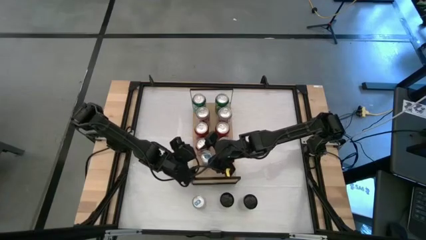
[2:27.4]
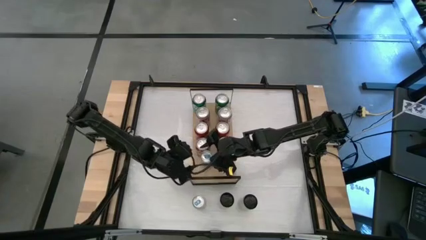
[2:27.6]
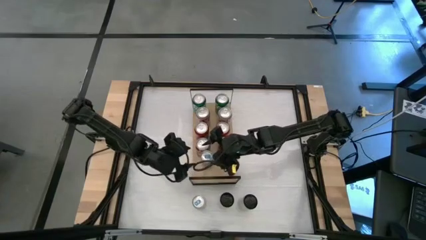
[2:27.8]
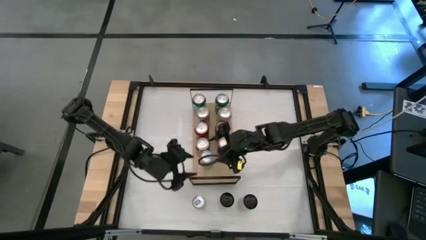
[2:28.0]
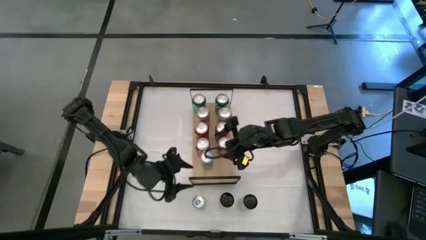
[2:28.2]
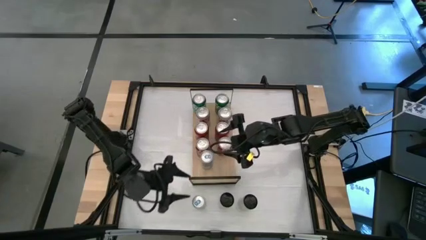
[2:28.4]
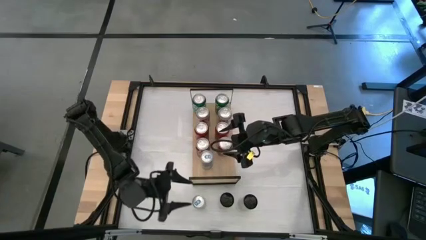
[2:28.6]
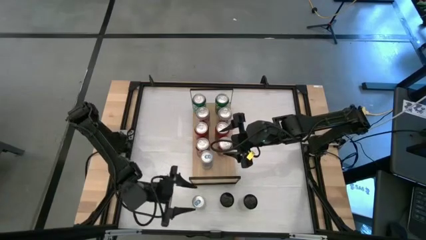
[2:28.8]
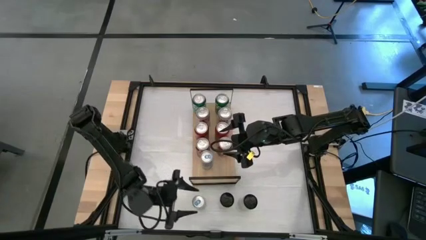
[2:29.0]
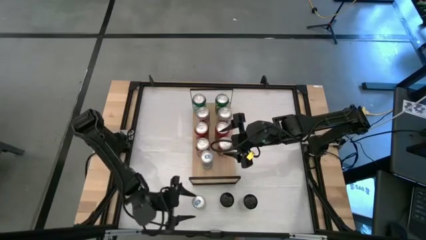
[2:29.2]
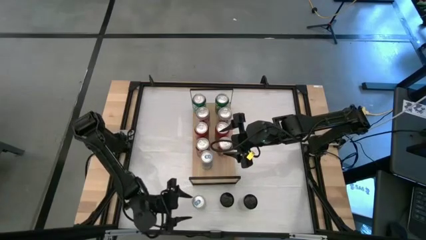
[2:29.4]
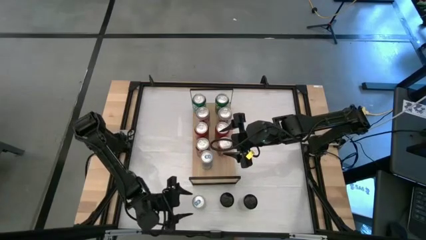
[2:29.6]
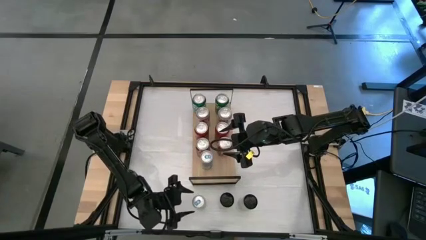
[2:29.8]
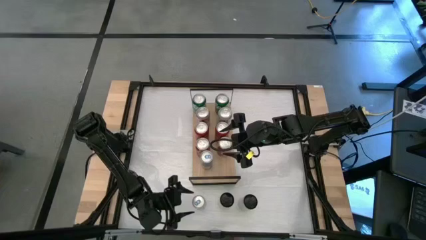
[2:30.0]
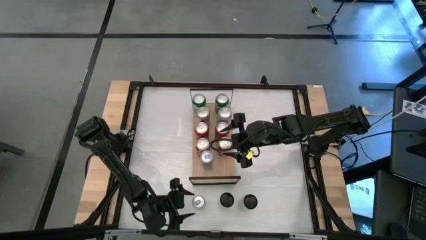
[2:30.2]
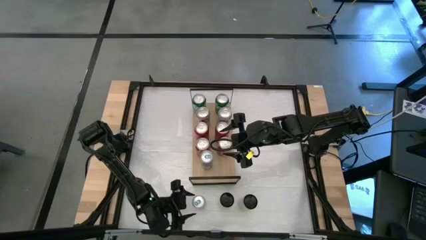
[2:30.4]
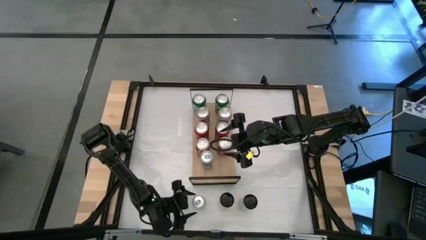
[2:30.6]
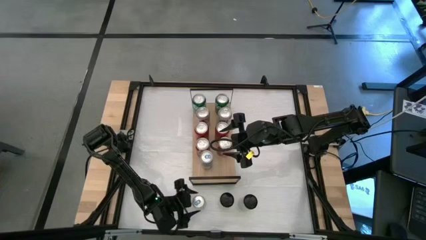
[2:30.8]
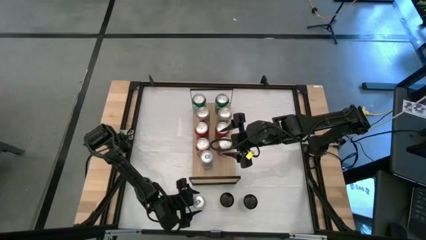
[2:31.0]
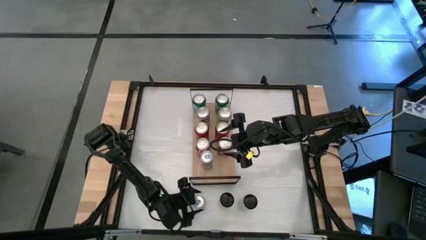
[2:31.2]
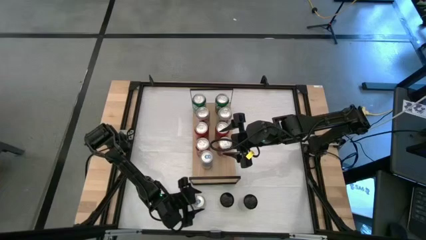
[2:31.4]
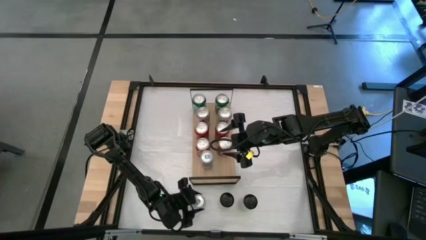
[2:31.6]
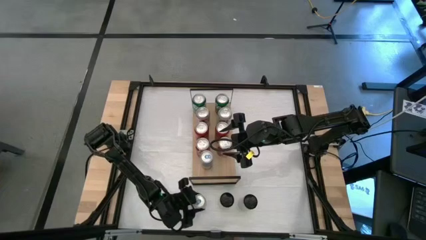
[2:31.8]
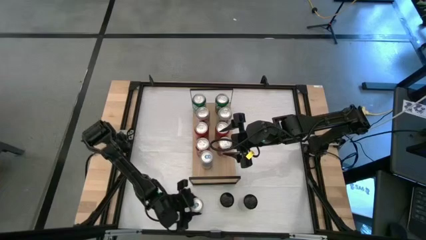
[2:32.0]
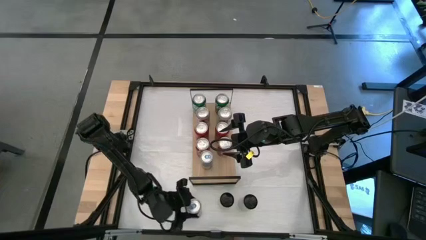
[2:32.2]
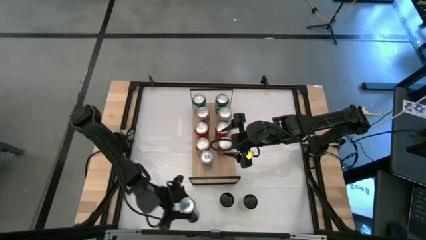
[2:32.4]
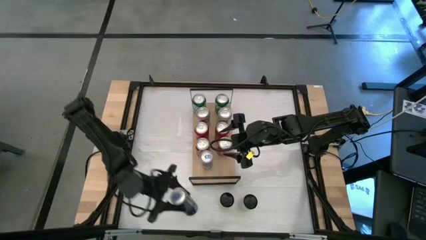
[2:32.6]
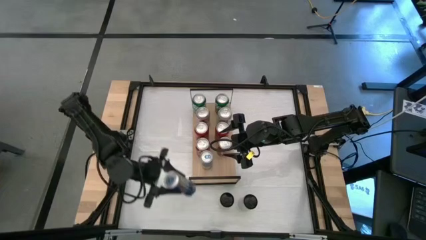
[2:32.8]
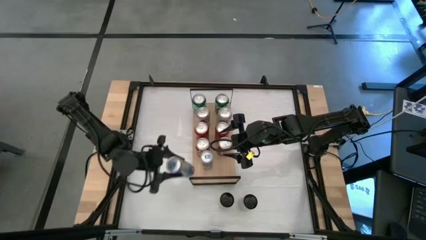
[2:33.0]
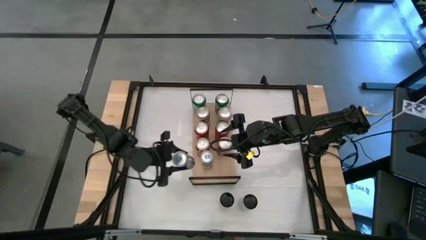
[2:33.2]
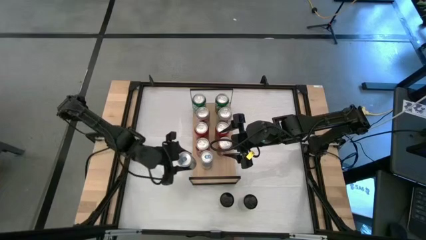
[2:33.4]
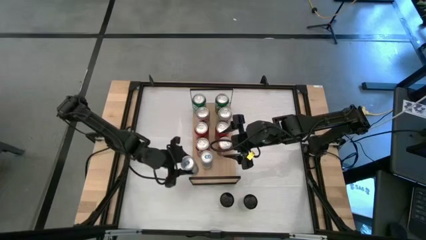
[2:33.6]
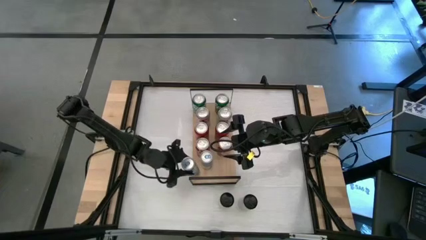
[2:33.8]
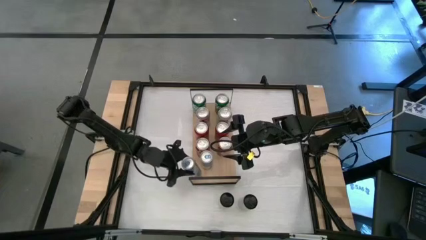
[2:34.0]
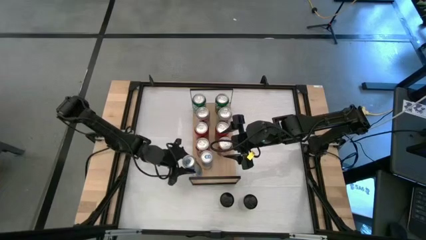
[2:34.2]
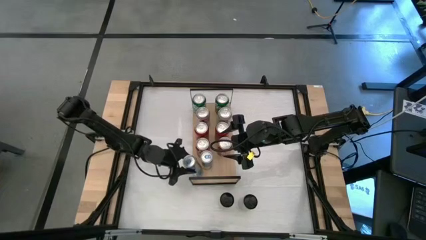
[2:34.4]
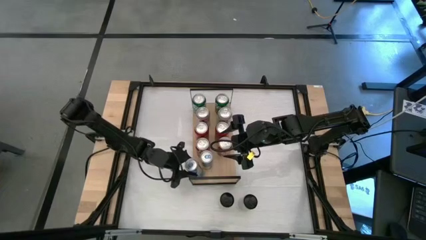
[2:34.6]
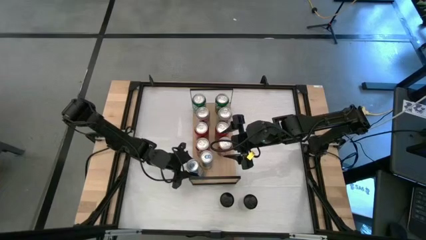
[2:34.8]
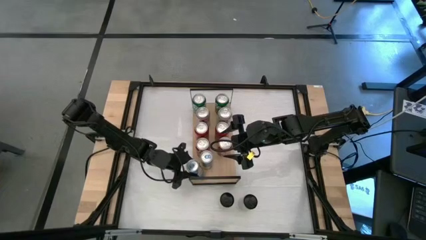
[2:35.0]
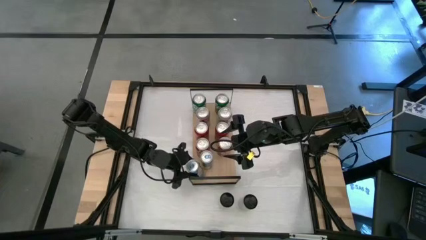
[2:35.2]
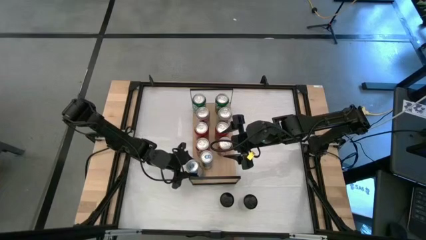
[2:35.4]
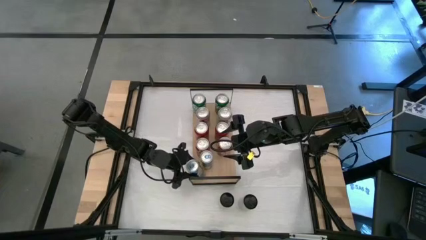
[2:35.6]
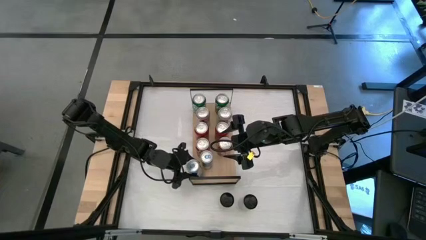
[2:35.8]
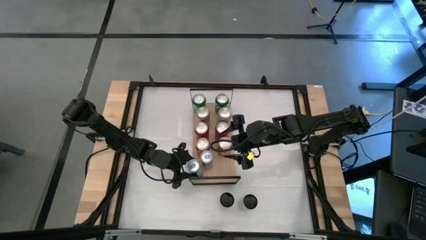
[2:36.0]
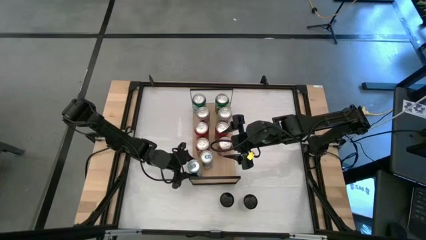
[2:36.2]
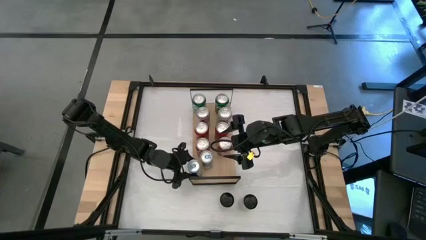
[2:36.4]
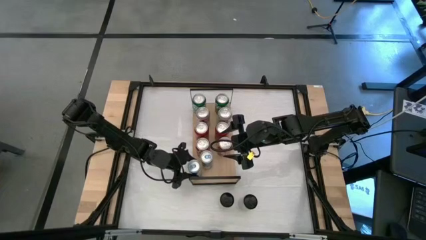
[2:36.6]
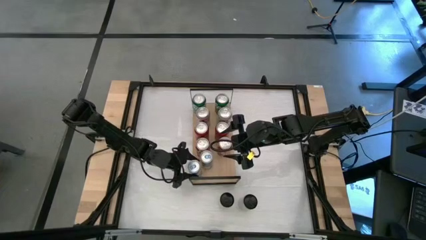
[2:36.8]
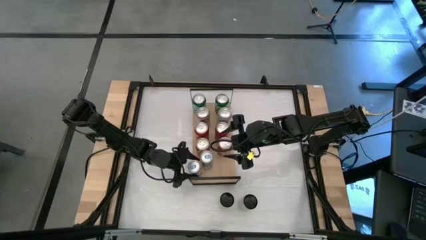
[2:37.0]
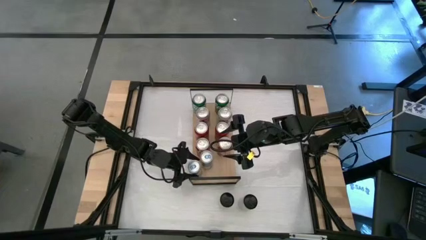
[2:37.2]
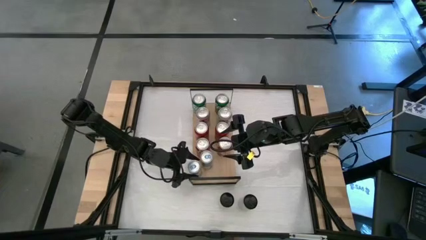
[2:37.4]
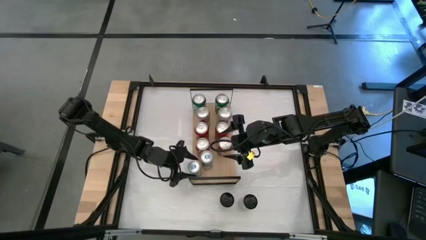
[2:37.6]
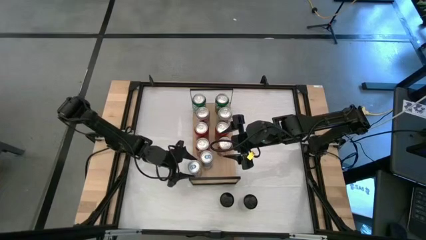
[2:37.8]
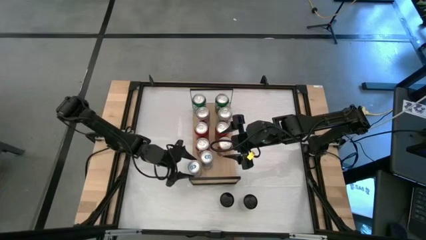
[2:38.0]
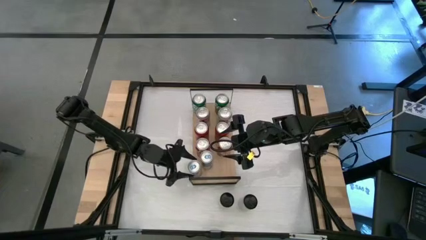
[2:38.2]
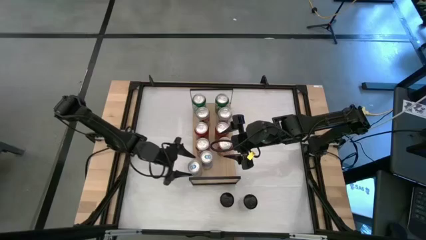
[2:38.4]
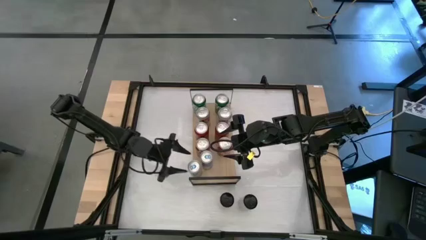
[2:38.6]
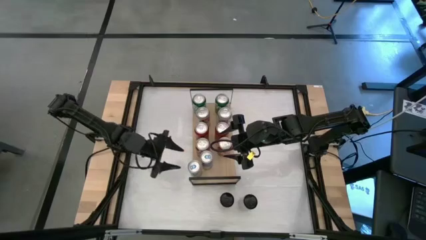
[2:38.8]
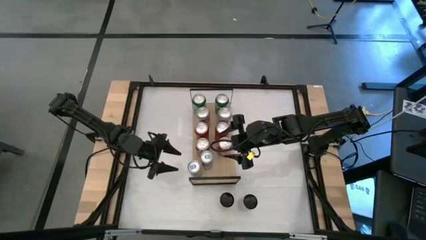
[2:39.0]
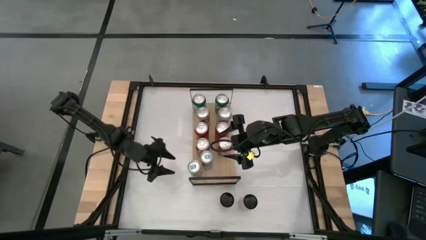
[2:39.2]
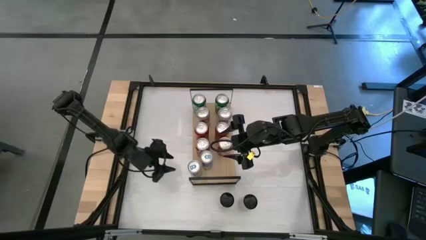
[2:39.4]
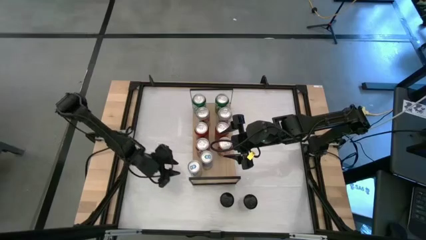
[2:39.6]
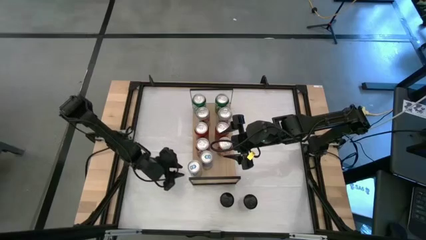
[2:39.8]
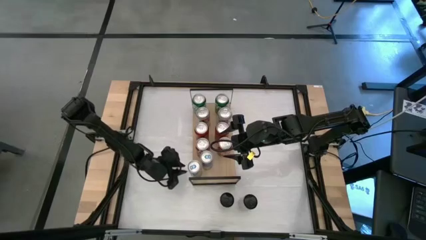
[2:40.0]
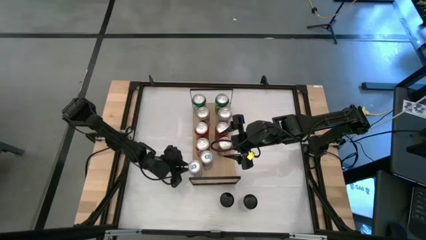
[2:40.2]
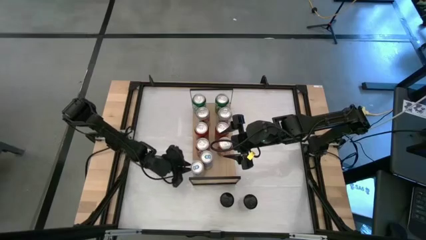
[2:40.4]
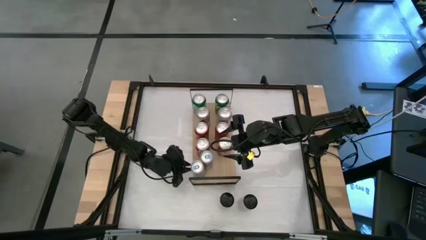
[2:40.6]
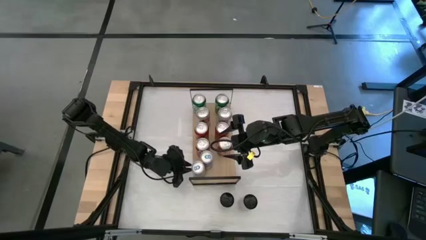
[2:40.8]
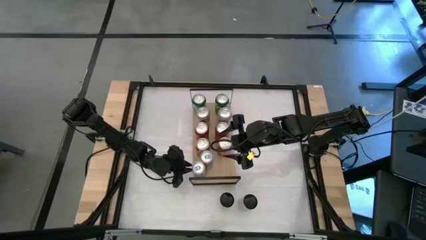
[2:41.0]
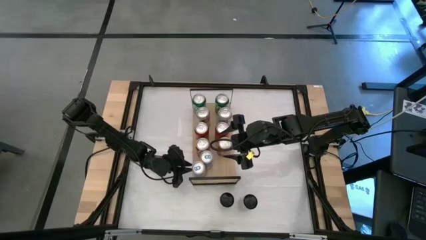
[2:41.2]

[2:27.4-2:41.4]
Task: Place canned beverage on shelf
Put the blue soda can on the shelf
